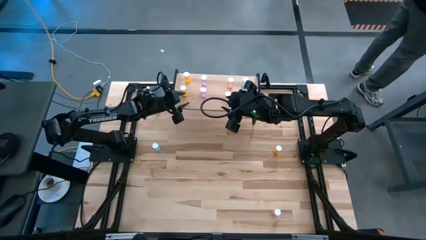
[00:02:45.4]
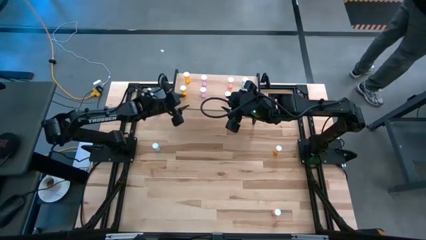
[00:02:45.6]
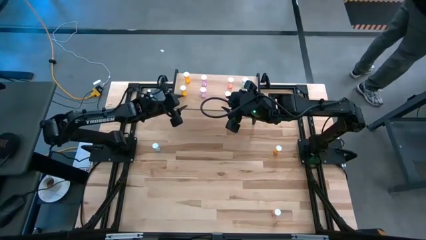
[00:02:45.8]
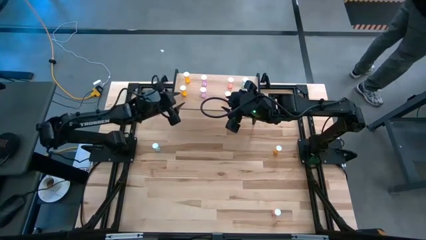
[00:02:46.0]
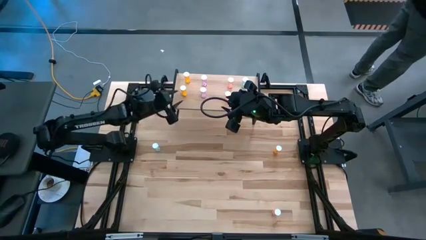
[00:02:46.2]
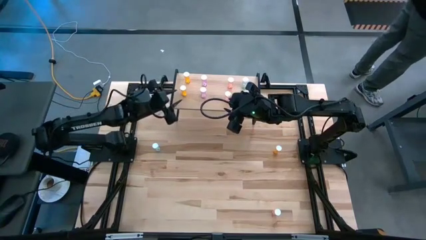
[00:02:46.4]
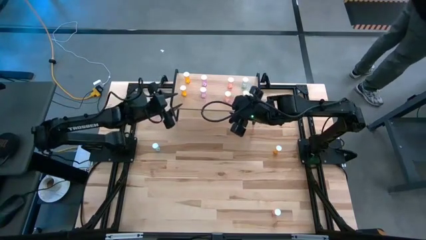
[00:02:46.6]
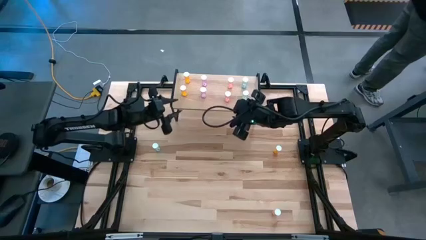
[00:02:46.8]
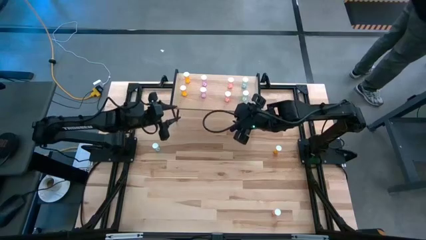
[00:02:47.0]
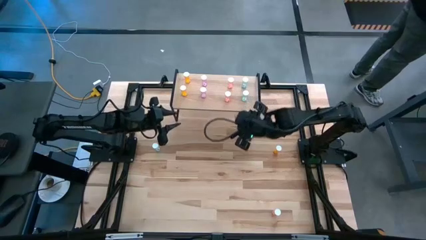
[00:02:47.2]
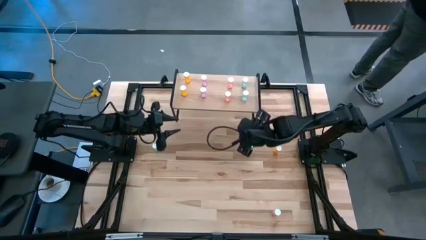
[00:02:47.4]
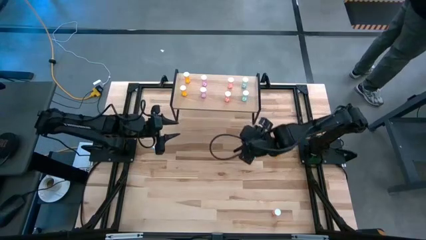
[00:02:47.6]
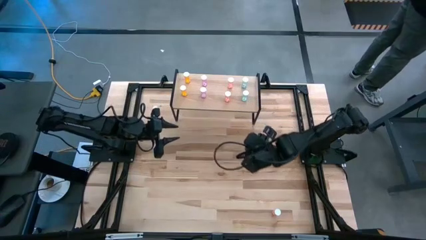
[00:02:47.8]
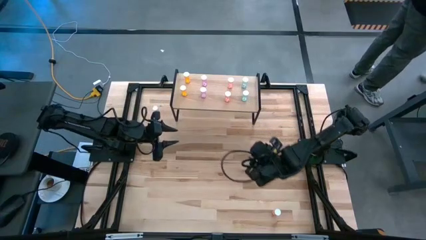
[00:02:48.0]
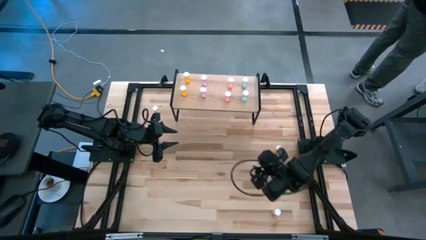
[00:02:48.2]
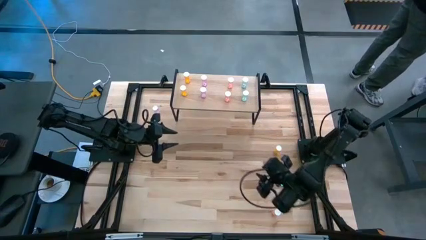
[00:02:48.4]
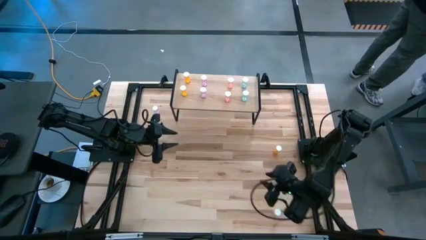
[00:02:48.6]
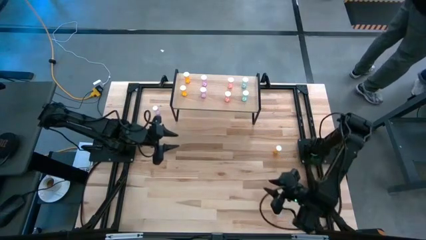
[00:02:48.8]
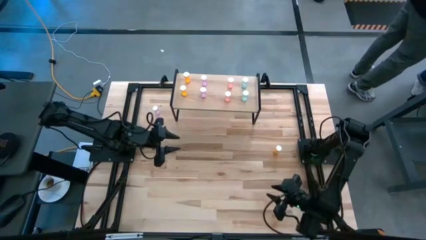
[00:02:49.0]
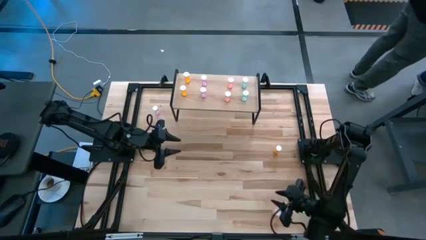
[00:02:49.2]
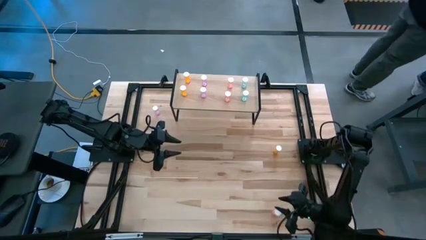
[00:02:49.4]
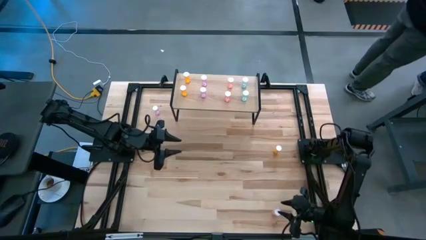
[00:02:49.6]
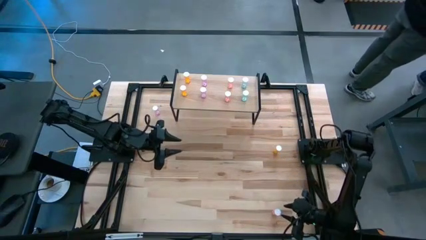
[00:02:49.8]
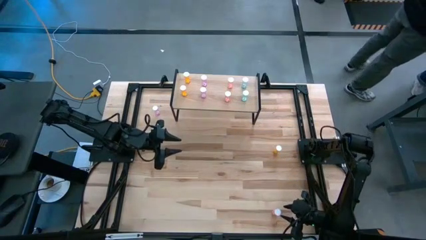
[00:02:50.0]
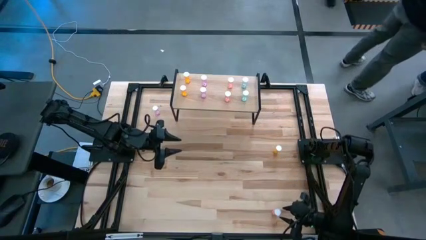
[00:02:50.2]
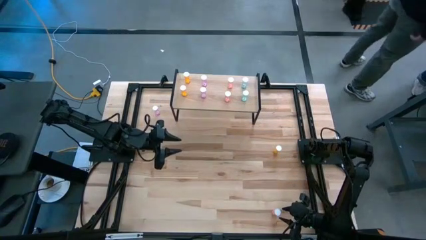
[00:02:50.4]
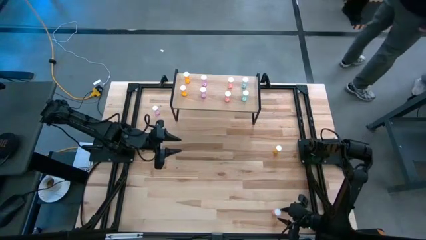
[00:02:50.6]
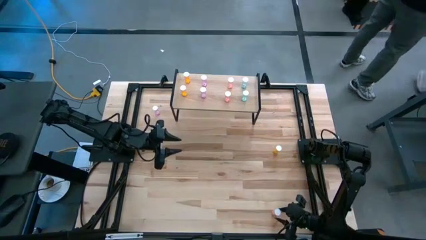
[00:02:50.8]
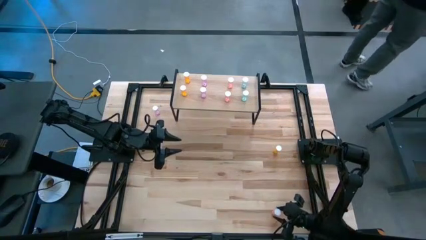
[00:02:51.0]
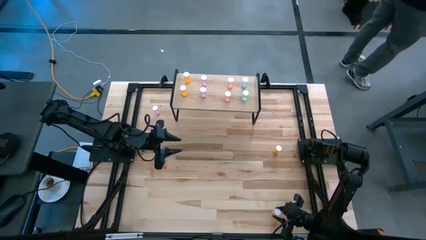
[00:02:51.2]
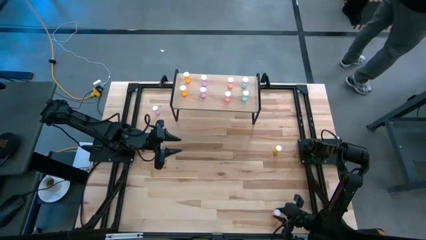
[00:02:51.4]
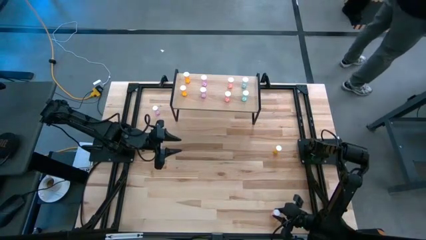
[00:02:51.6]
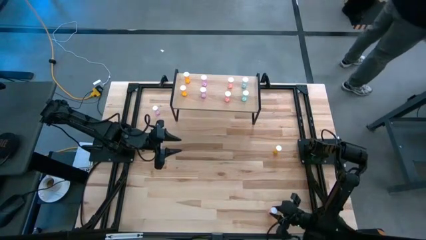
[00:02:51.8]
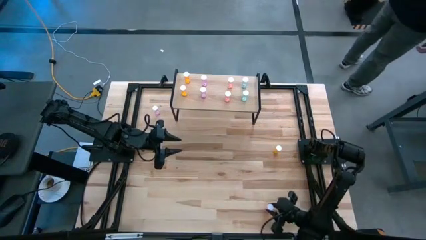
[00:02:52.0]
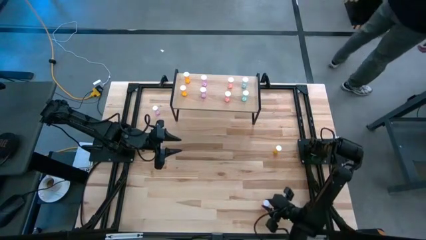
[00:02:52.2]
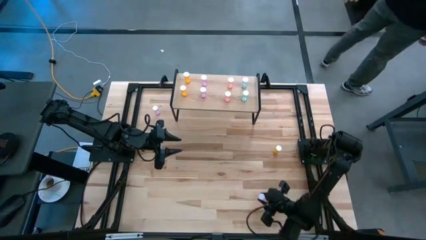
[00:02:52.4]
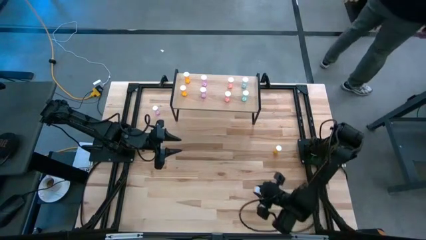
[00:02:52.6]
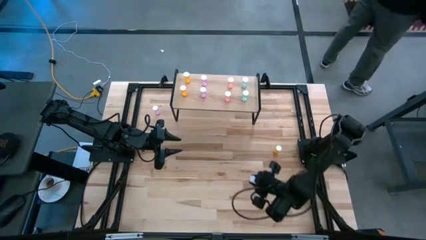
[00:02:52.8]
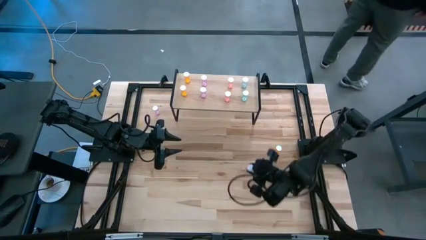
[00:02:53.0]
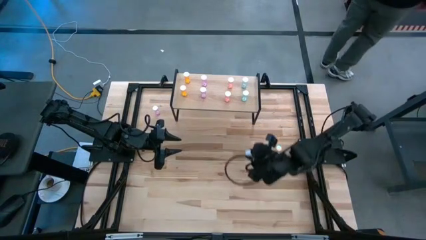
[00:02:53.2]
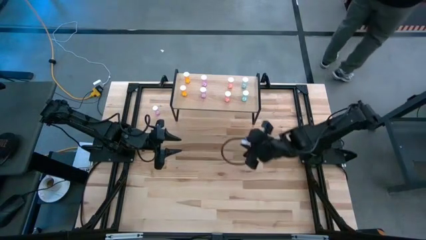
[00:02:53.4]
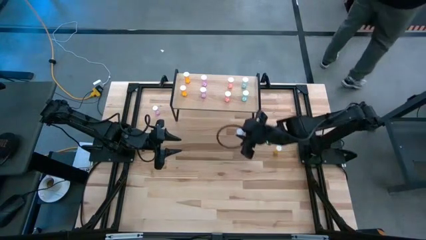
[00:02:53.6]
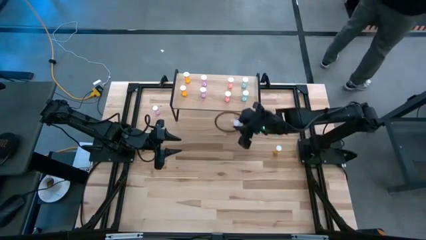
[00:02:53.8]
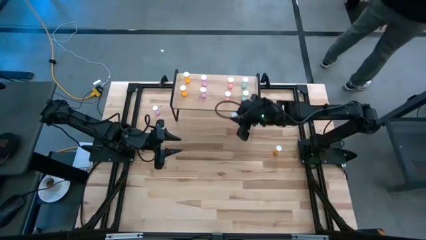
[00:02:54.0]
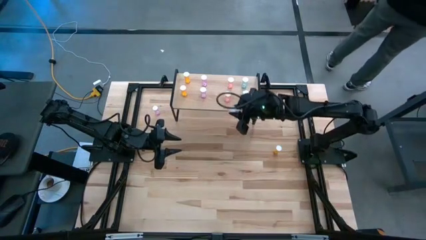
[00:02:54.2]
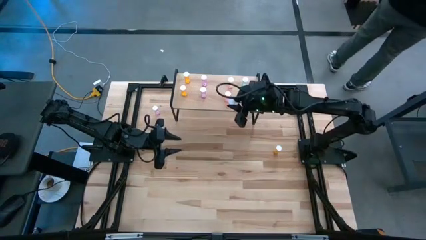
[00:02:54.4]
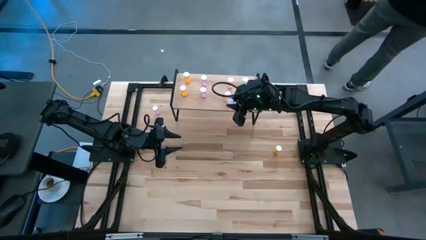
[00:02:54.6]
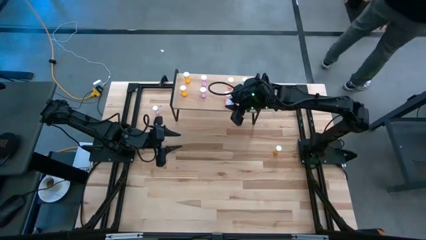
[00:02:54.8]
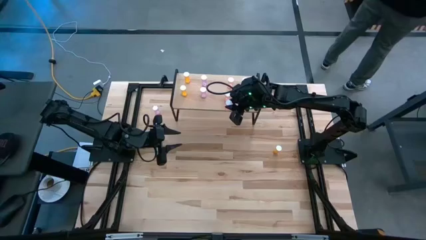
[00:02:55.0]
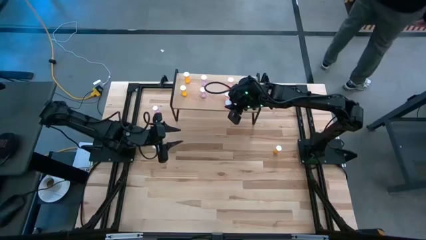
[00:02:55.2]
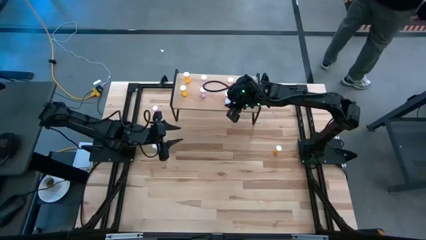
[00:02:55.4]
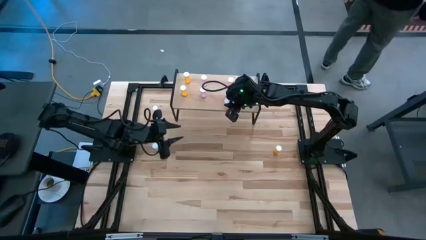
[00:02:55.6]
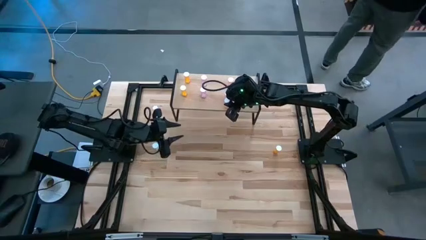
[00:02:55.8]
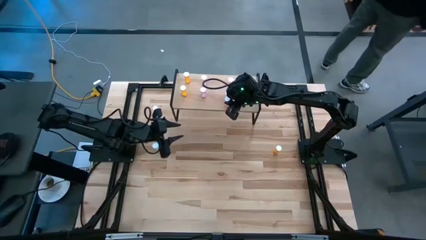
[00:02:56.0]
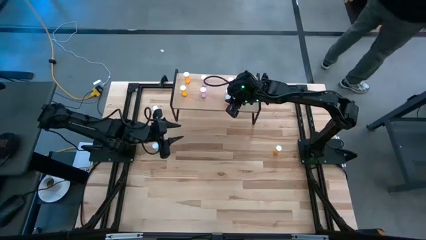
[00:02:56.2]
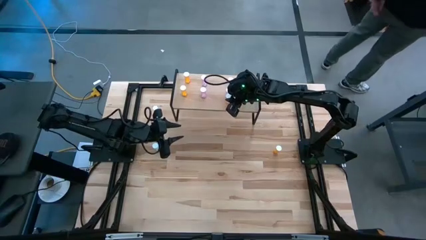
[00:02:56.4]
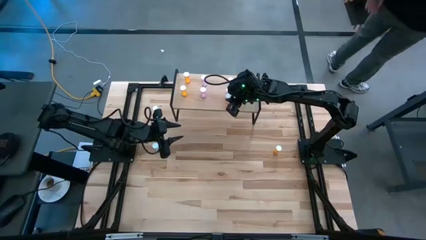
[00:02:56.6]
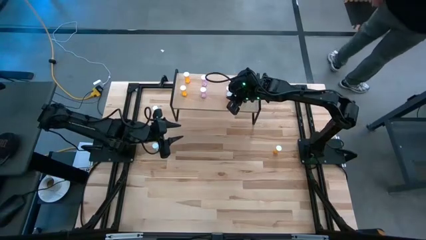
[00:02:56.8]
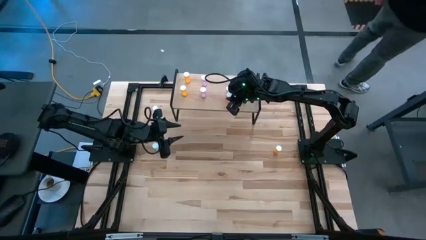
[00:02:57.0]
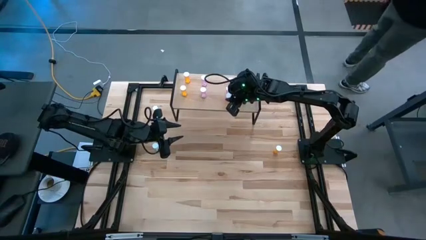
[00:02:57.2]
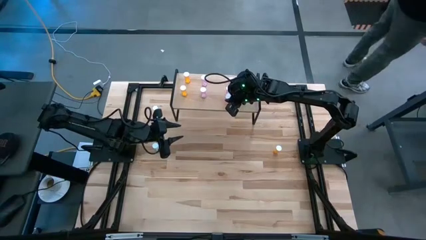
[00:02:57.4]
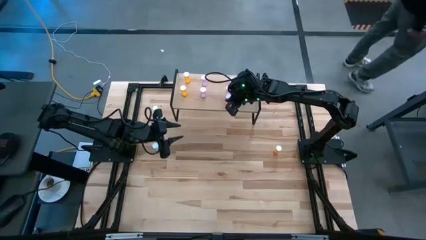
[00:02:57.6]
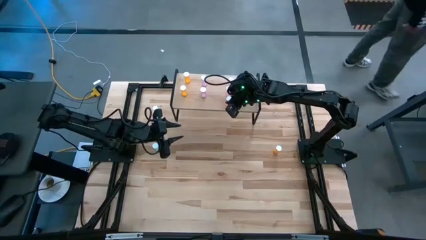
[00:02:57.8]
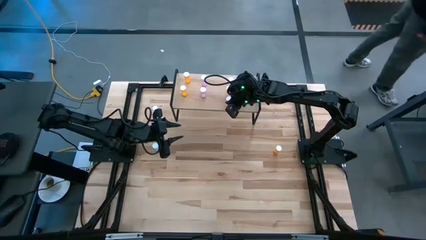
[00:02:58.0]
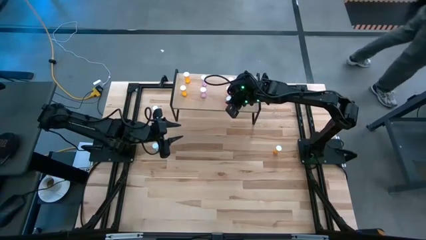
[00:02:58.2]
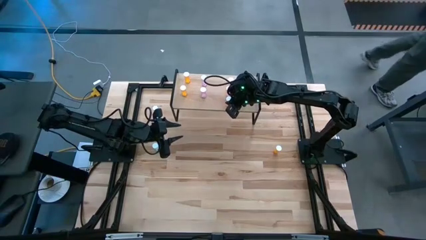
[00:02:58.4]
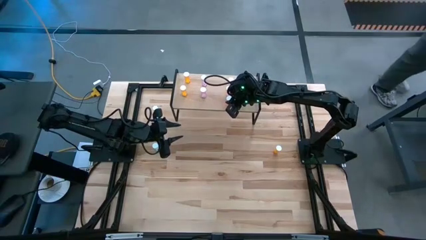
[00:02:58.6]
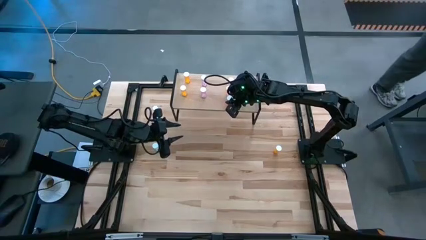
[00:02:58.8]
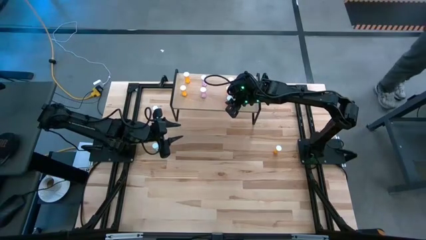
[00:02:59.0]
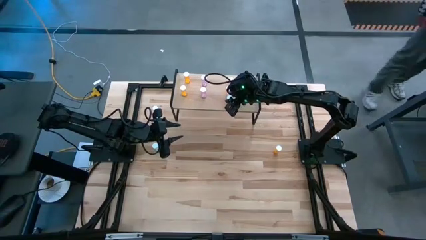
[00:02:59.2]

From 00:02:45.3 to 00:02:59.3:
Task: Pick and place medicine bottles onto shelf by color
Put the pink pill bottle on the shelf aligned with the other pink pill bottles
